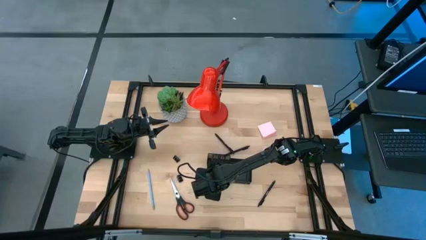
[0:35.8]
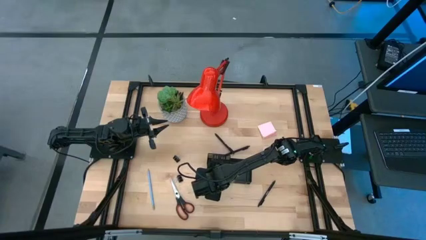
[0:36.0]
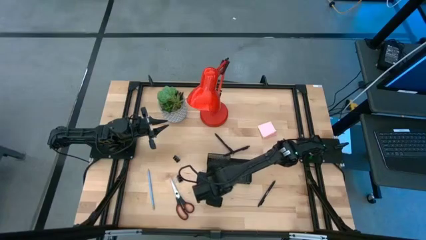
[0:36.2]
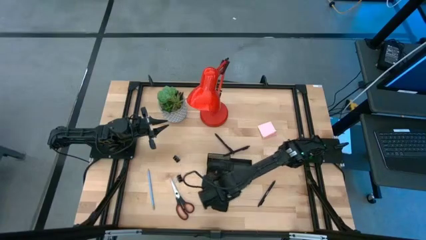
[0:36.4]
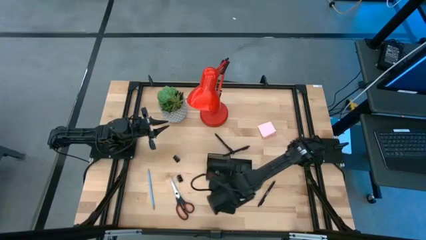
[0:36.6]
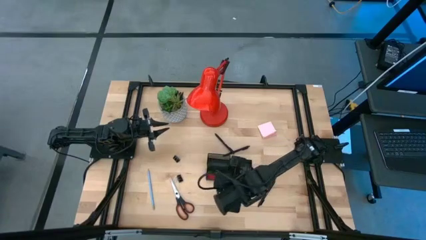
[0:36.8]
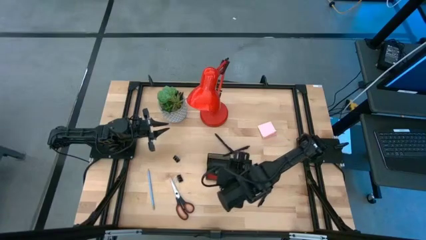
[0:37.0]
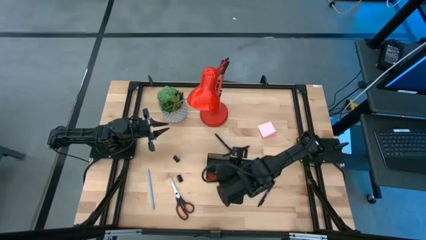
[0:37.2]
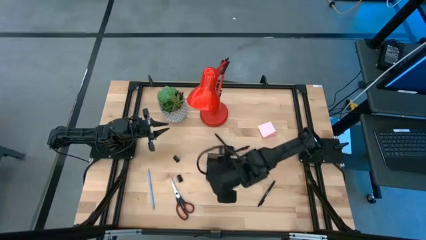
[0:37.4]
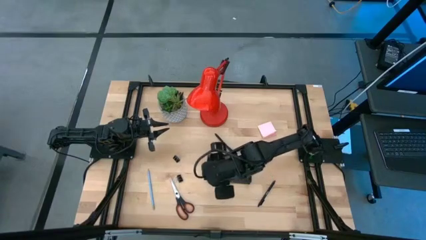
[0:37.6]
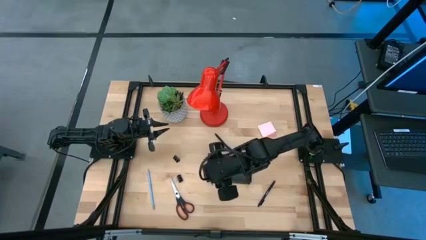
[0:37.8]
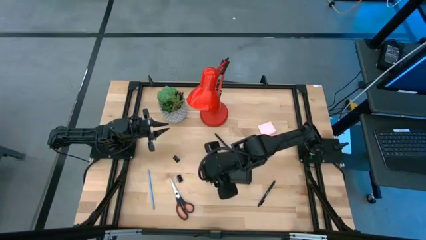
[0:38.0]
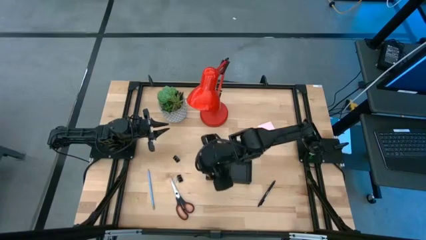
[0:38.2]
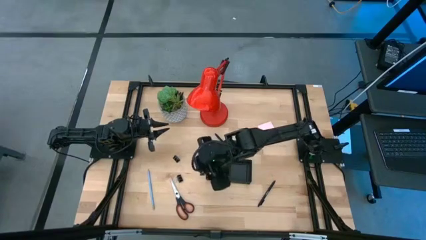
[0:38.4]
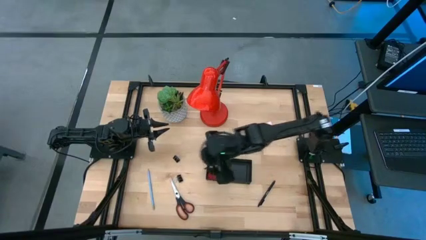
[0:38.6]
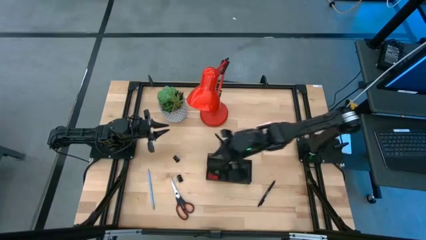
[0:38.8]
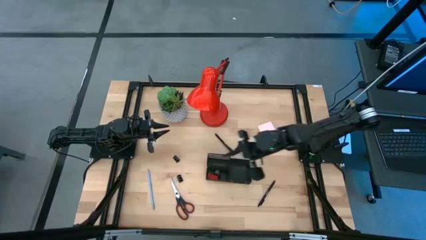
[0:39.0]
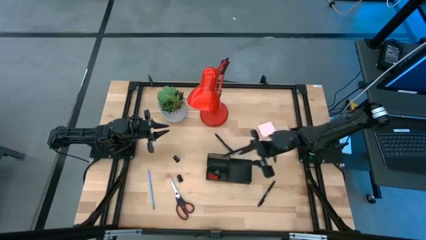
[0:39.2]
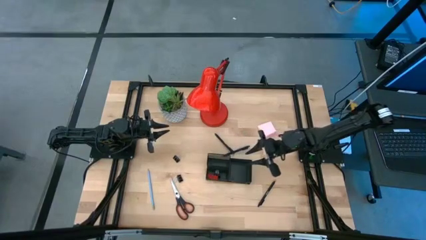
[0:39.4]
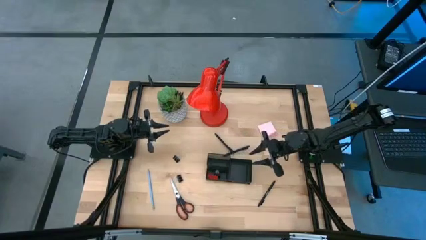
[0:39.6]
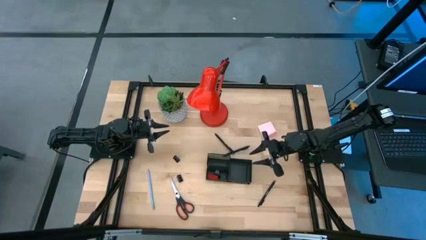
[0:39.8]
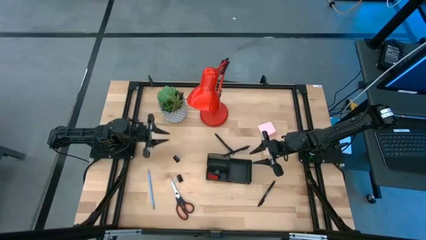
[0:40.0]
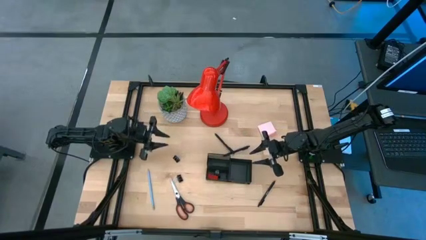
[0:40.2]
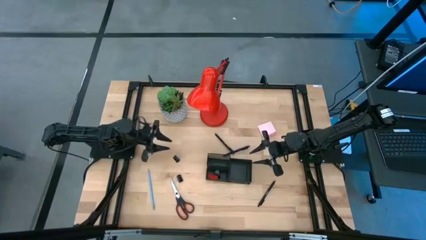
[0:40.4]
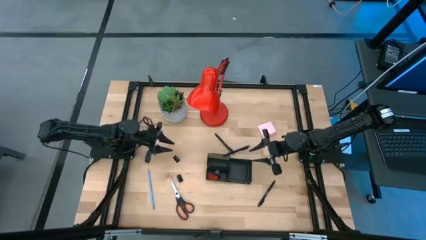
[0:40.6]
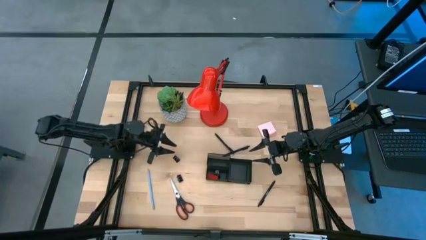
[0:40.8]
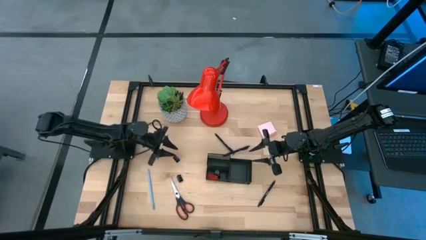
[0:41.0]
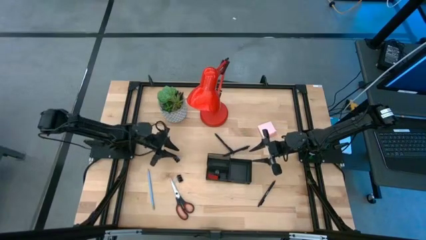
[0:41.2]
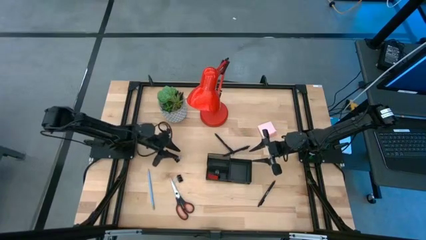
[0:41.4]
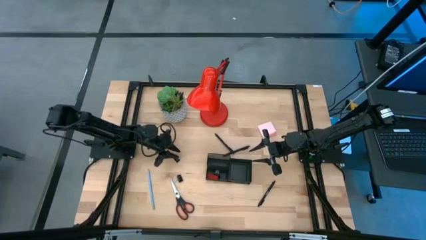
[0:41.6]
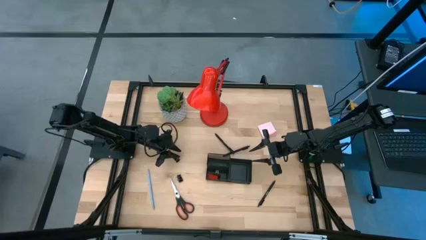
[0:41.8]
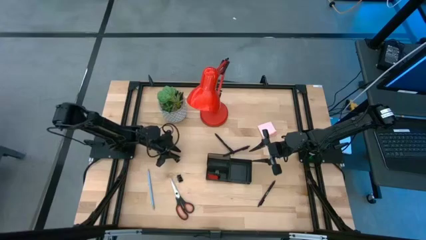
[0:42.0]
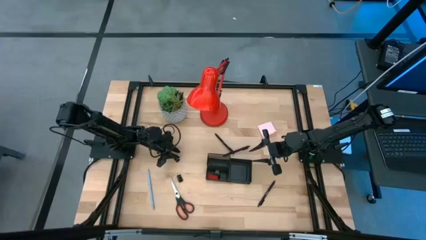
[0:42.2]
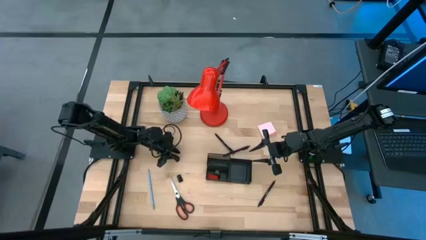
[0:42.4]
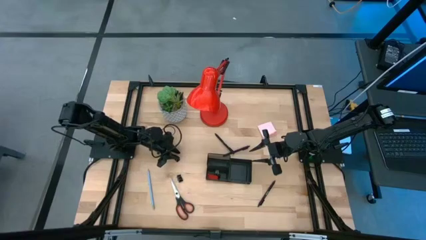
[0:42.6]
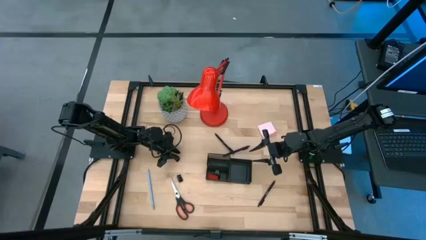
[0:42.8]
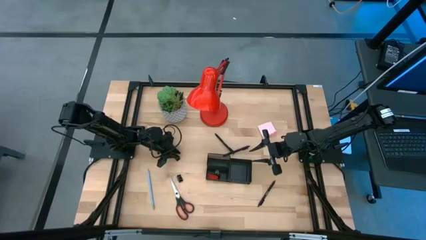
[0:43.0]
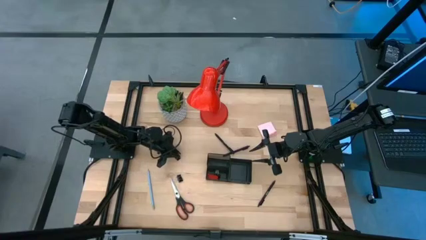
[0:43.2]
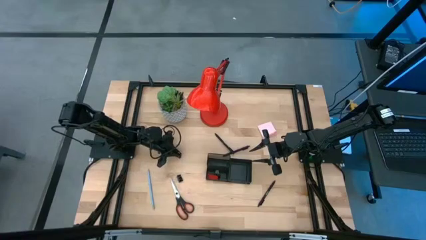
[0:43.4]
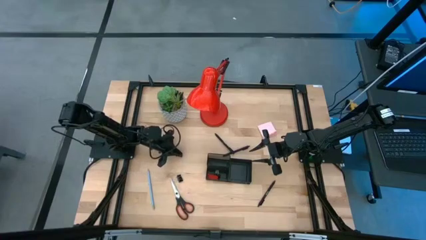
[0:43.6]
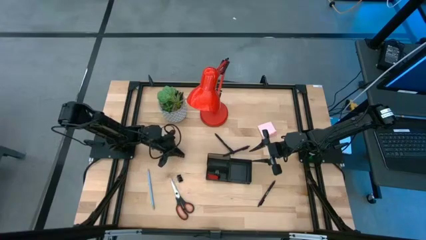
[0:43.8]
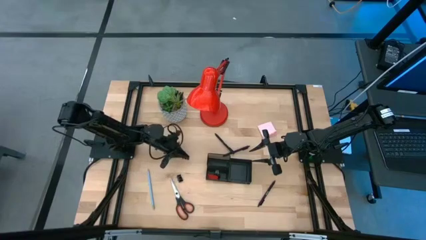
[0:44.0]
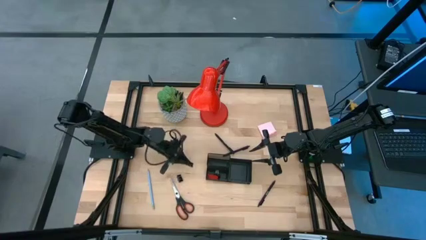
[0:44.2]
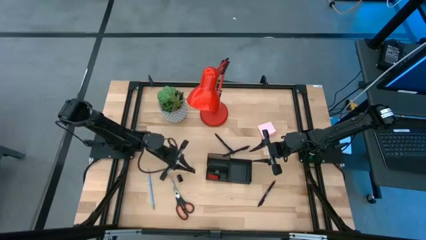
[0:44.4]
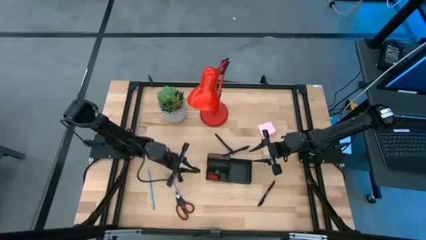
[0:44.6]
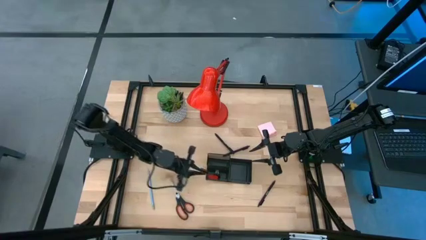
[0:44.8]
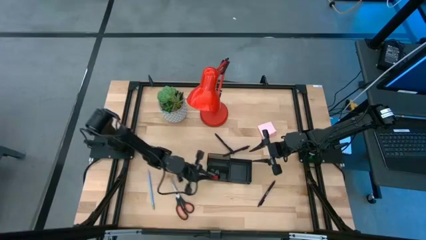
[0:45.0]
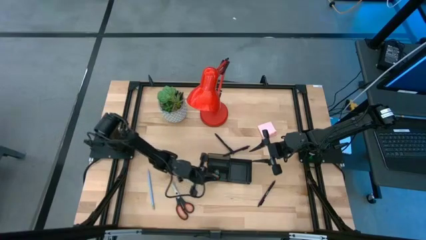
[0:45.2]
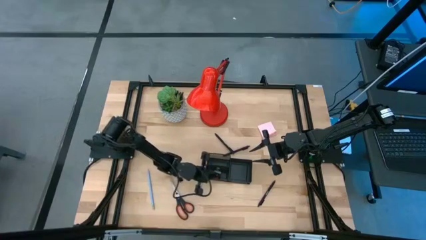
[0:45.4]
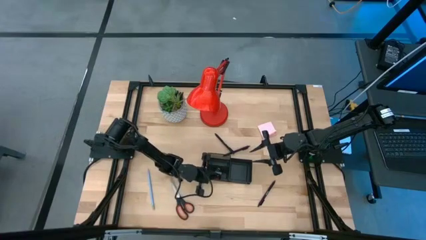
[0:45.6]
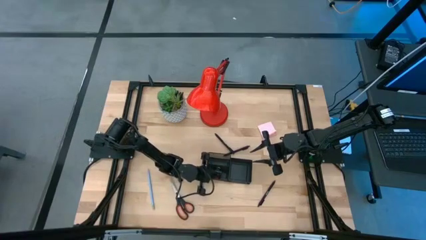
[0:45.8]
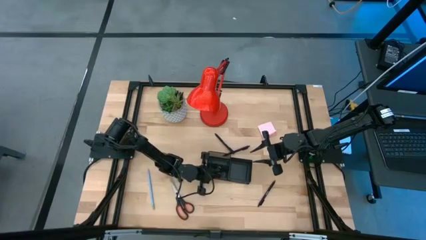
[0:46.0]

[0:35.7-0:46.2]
Task: Pick and place office supplies into organizer
Put the top black binder clip into the black desk organizer

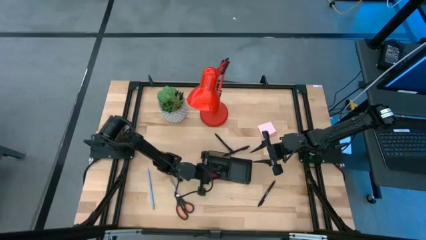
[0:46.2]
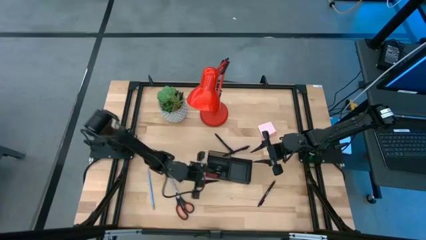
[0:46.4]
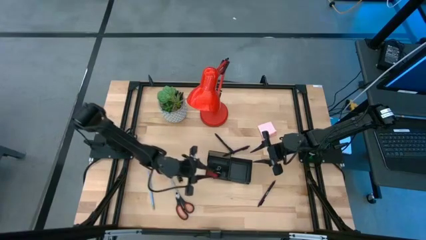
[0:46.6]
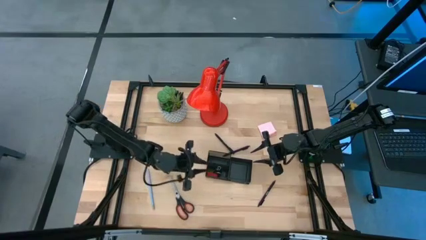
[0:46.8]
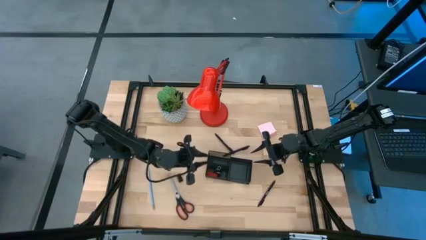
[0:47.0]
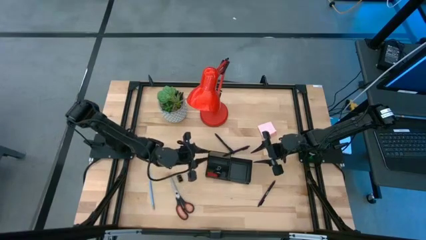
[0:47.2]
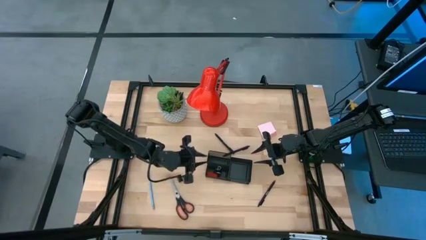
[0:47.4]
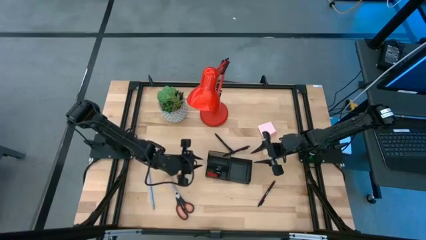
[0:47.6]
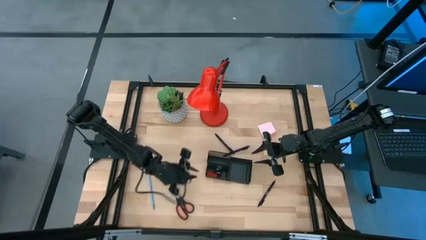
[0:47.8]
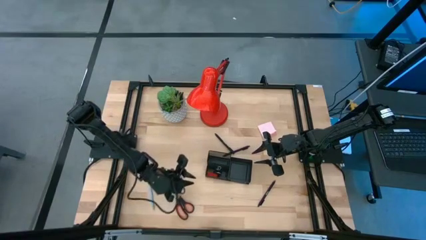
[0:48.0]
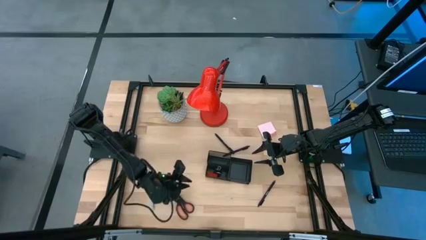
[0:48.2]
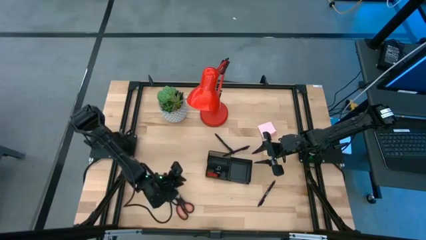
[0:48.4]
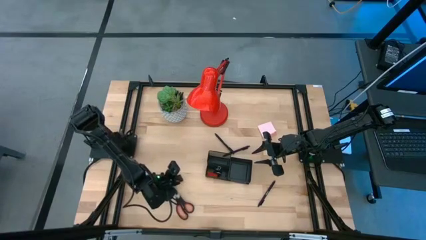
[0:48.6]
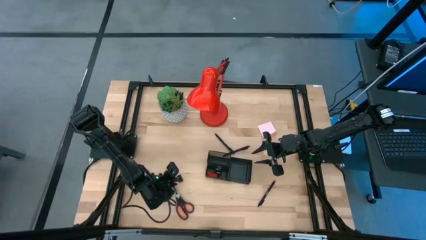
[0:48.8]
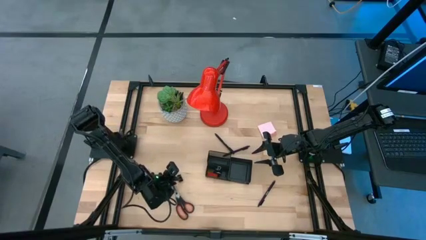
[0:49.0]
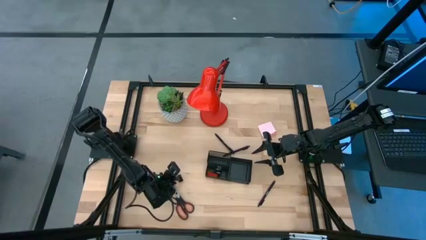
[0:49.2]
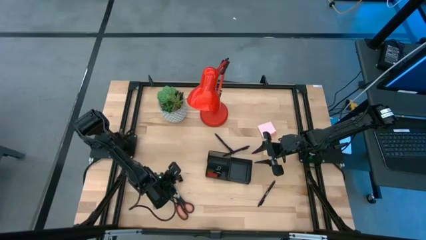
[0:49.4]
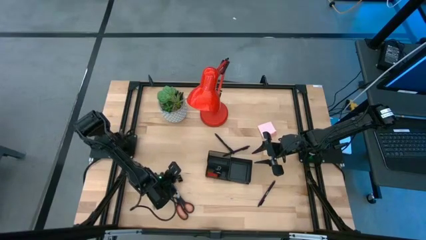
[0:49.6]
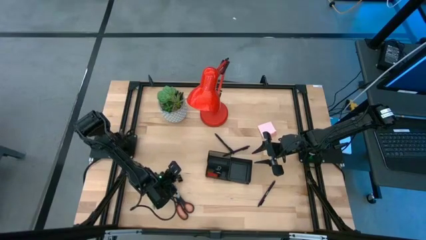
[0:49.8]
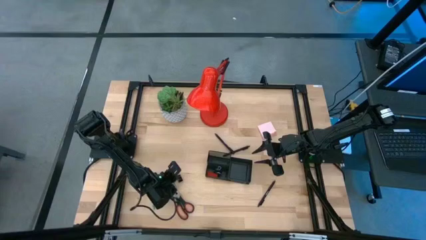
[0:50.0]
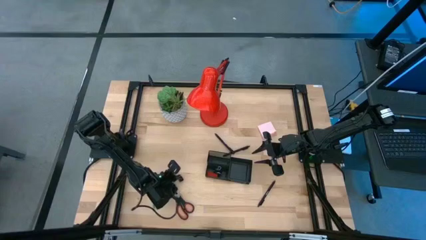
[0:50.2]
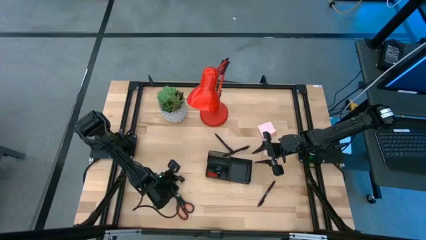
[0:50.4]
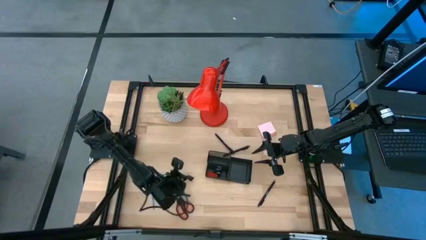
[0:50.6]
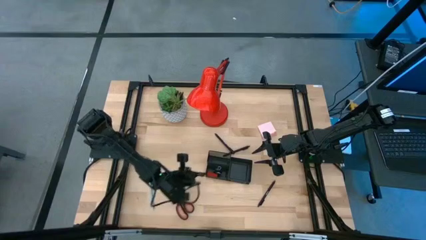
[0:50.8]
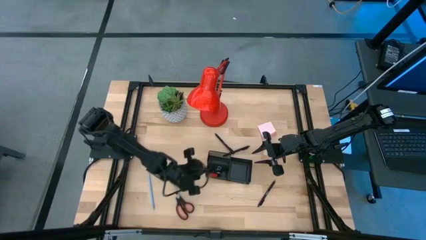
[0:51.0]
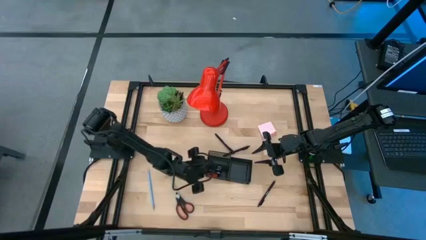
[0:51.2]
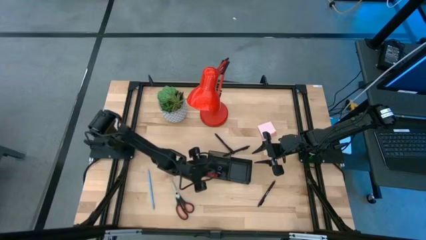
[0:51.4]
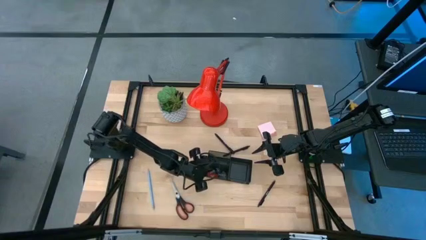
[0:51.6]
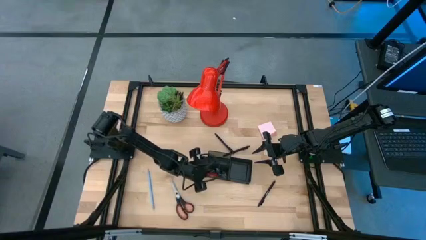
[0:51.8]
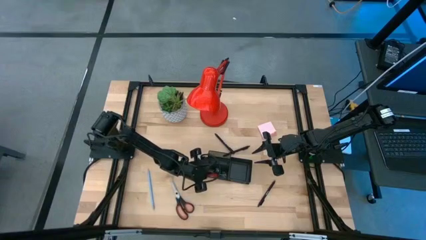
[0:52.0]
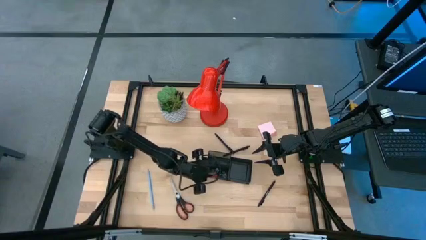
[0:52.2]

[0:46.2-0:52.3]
Put the black binder clip into the black desk organizer
